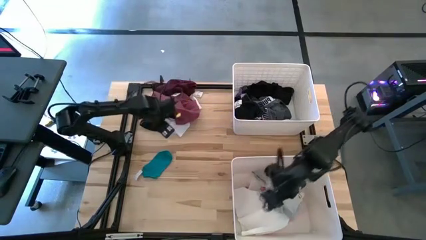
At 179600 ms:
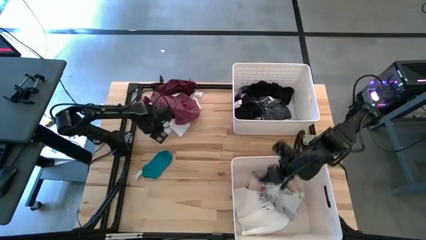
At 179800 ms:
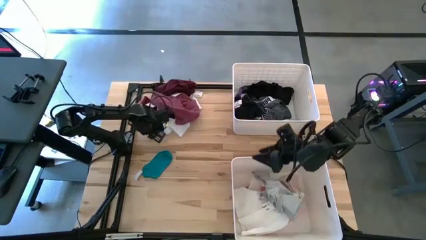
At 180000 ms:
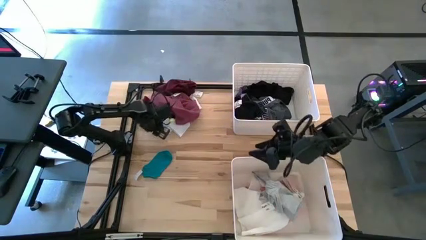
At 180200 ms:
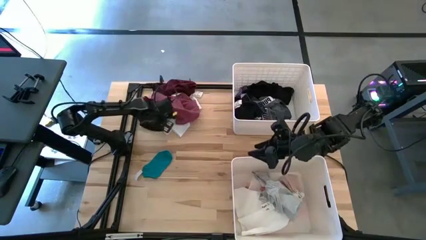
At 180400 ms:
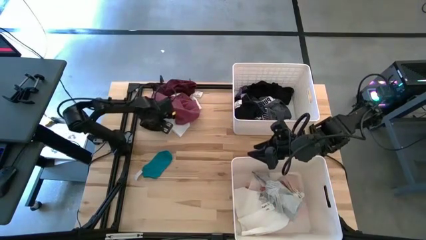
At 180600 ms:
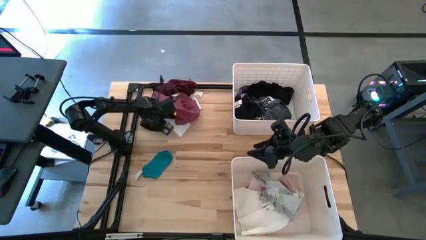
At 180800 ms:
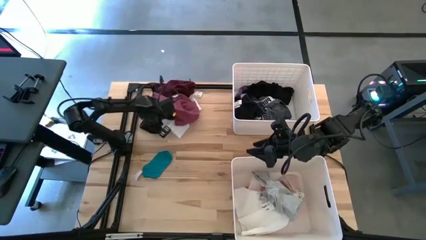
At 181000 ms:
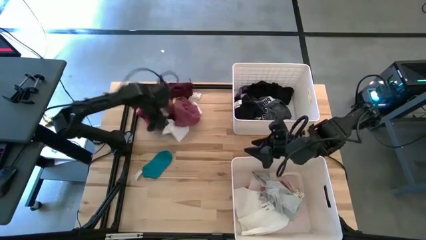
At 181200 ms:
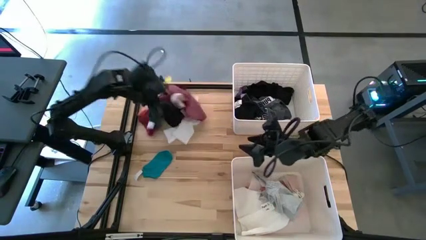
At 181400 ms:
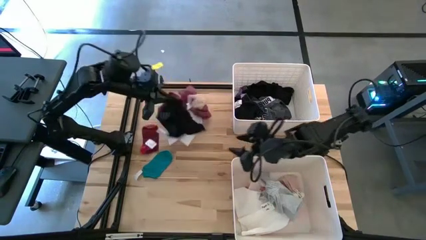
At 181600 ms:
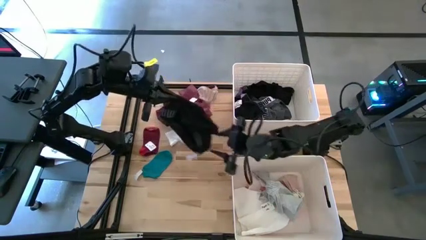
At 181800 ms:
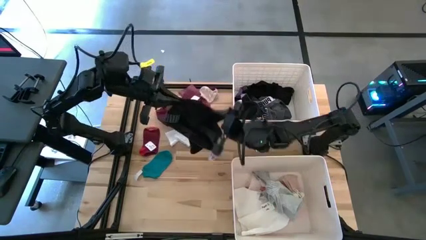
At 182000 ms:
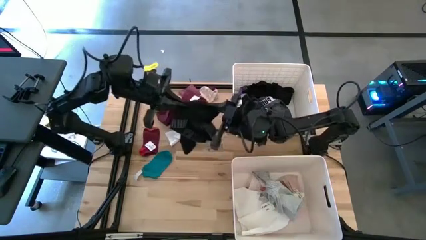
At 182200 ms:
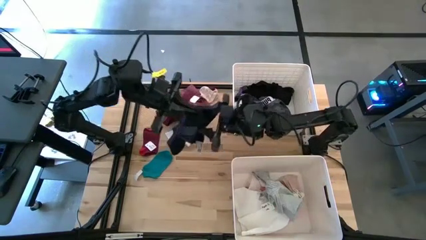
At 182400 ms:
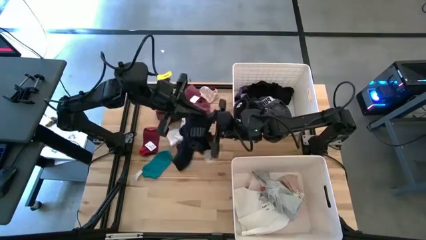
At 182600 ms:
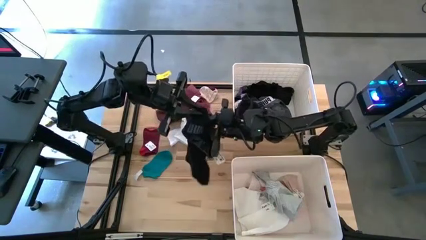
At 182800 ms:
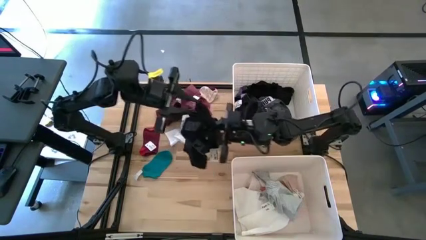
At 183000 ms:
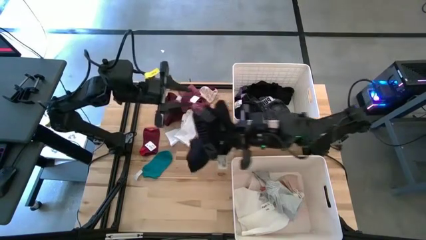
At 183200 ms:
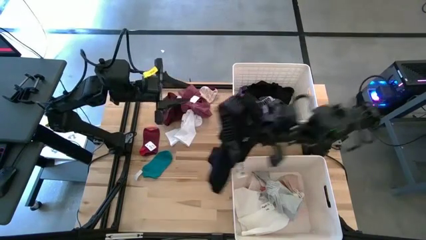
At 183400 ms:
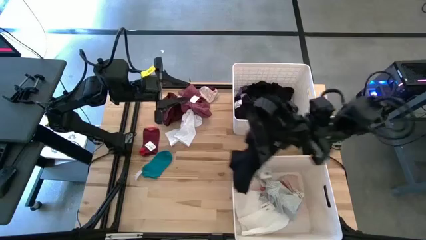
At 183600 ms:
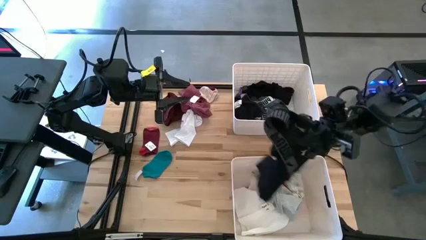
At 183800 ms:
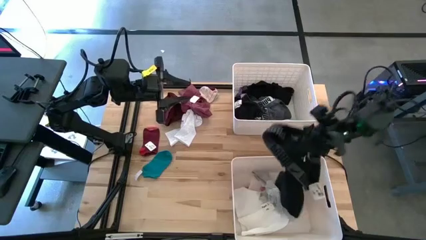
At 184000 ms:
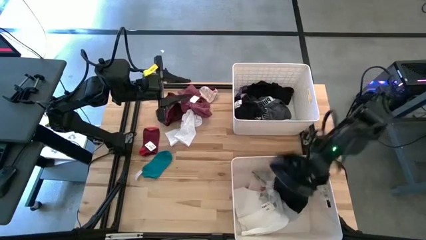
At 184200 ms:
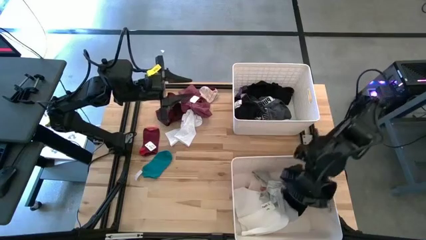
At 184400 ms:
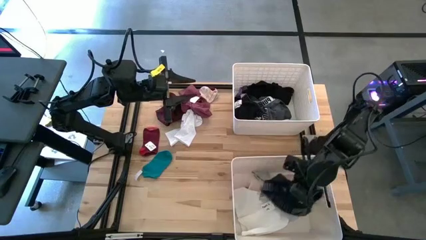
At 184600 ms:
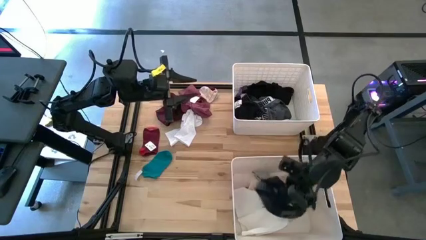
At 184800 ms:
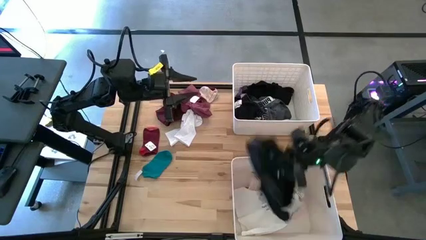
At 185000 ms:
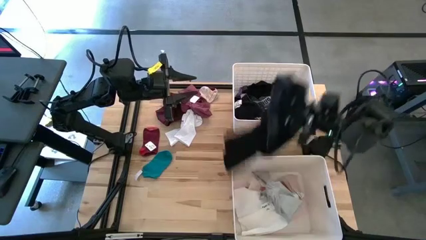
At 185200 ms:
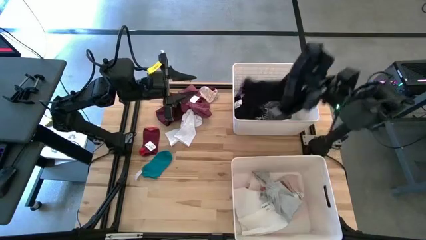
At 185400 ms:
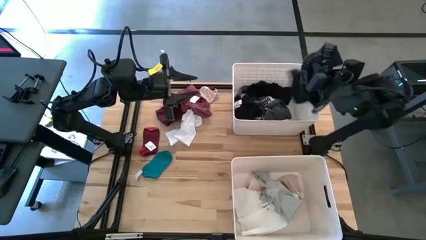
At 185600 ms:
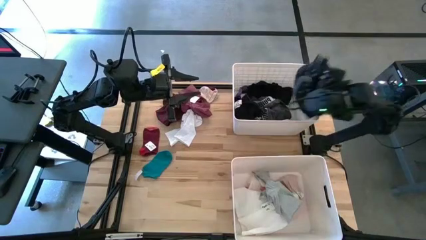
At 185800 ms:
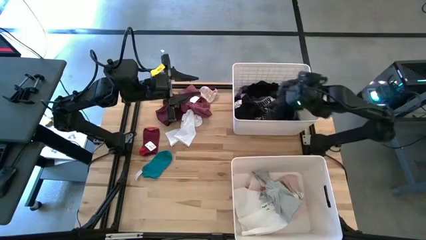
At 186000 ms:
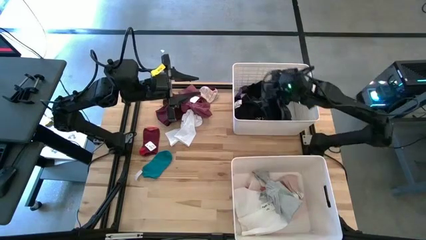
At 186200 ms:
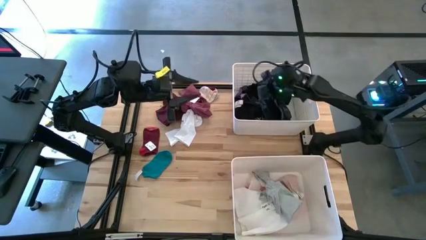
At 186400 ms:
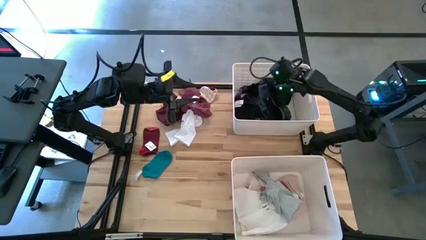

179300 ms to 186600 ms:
Task: Sort clothes
Put the black shorts into the top bin

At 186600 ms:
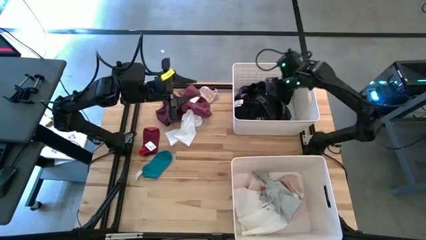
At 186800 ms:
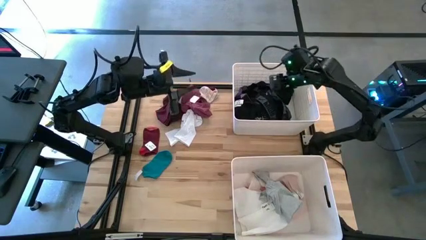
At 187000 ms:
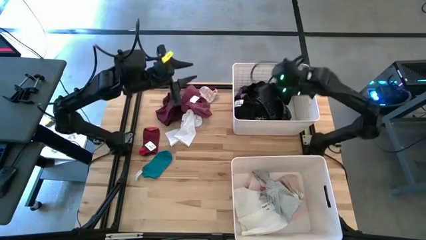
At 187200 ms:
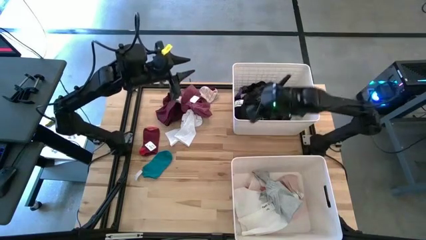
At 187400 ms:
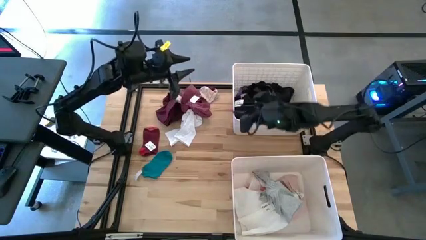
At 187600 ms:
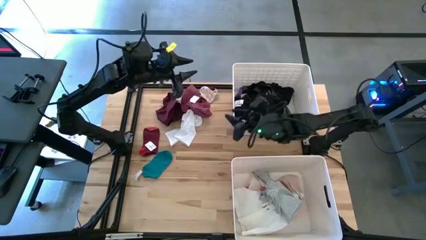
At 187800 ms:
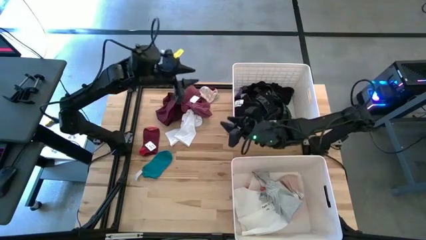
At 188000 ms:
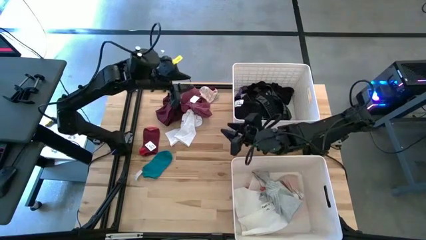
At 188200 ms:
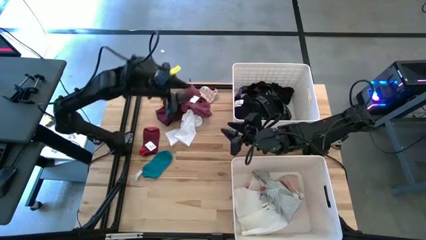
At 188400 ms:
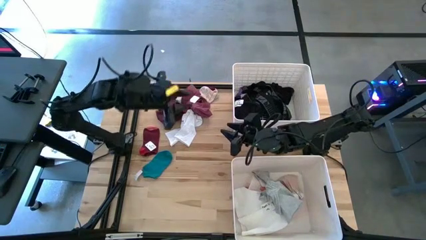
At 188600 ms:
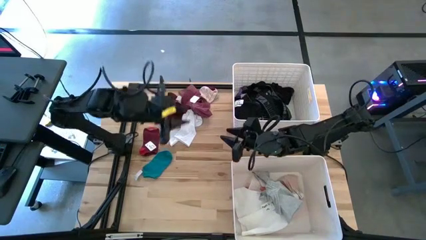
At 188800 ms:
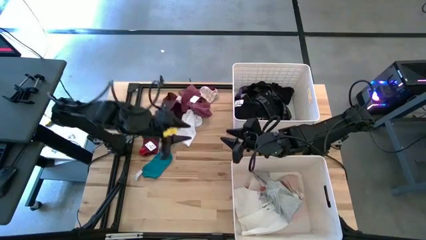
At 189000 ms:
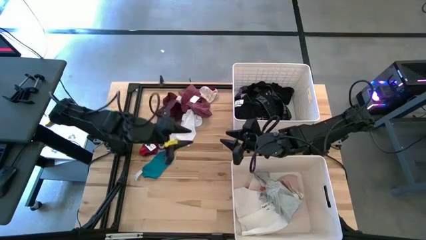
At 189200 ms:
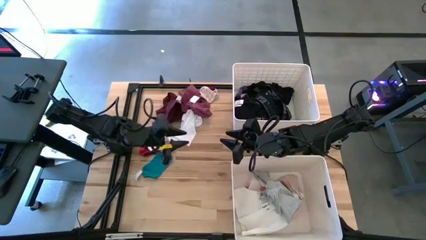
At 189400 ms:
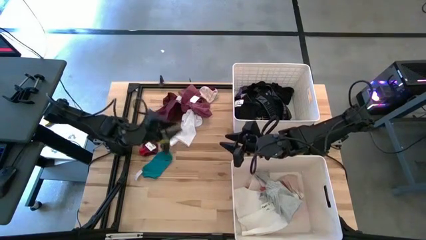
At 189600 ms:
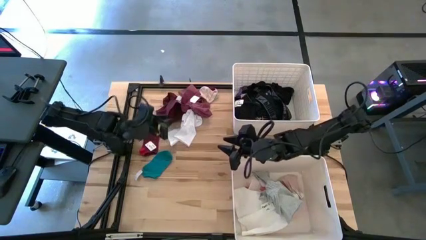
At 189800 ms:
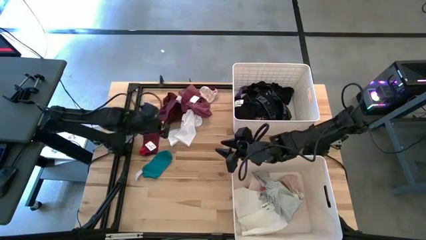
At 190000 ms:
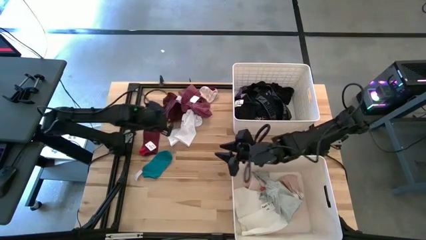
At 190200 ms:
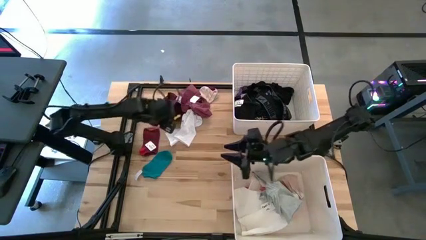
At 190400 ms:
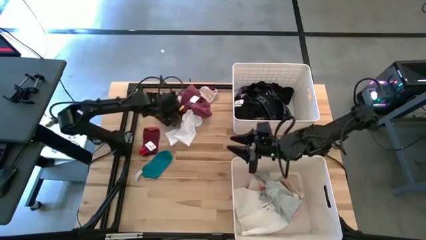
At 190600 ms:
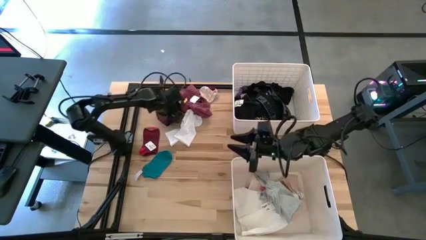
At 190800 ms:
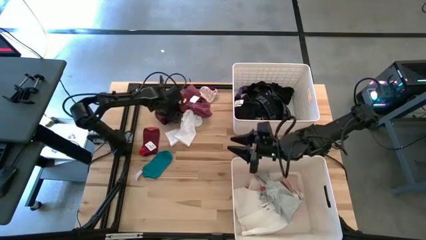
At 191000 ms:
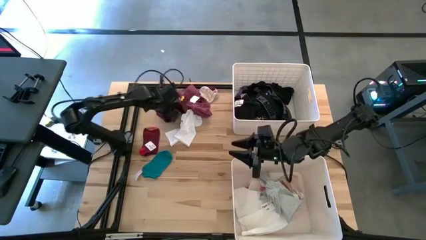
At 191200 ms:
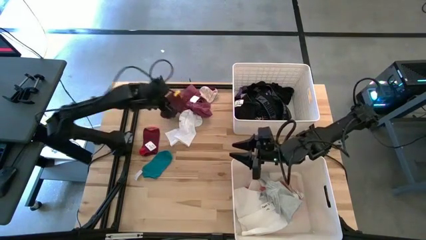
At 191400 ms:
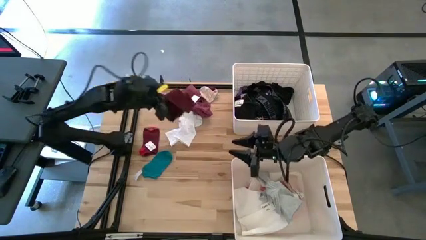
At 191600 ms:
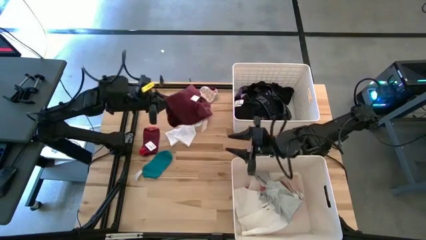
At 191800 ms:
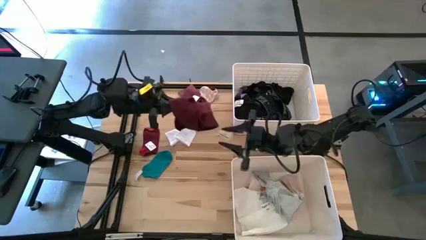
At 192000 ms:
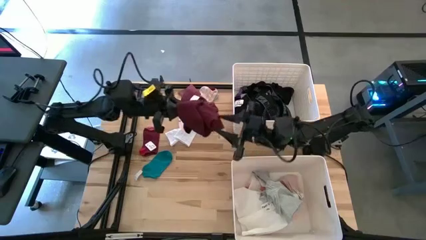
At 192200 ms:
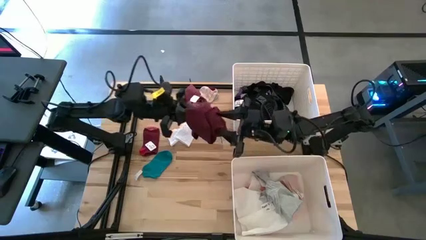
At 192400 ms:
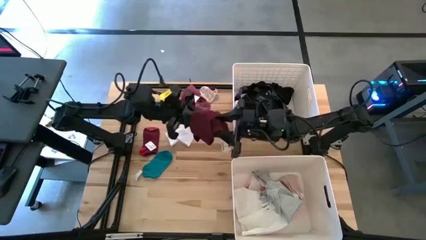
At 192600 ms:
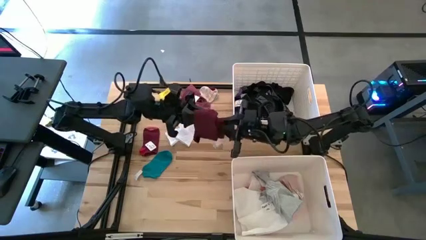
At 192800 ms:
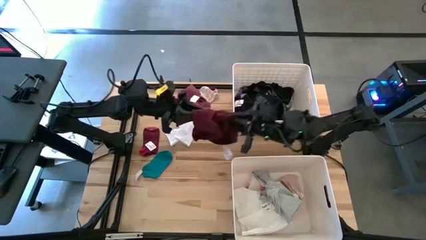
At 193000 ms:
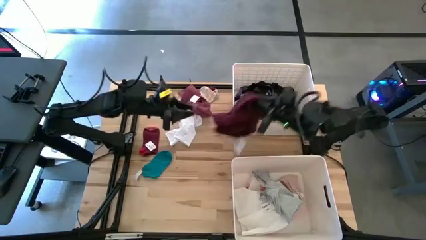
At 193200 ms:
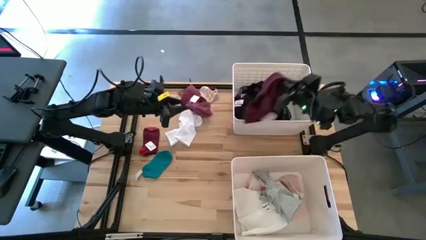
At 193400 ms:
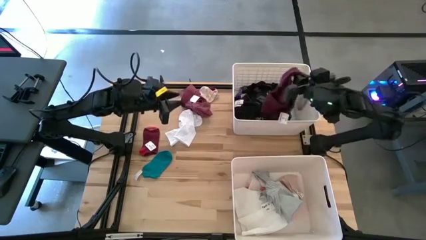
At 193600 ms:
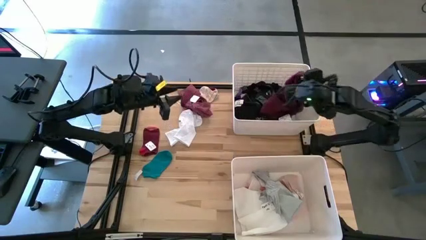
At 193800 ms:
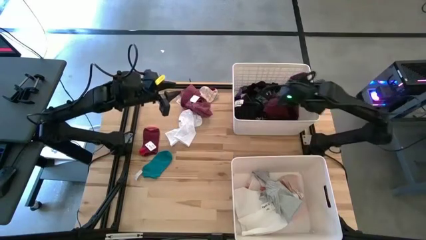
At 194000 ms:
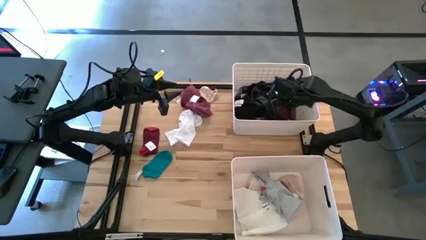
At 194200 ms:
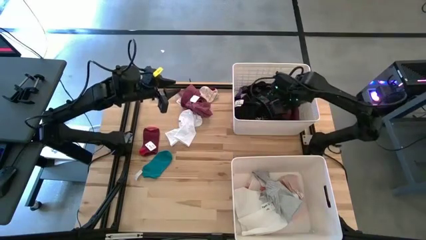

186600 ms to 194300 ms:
Put the red shirt into the top bin
